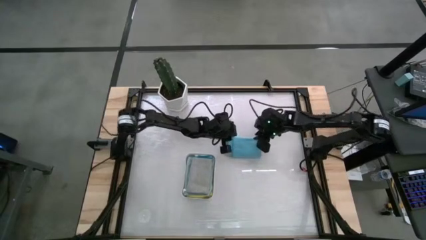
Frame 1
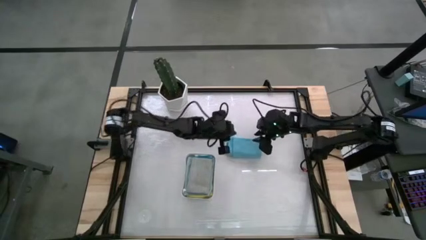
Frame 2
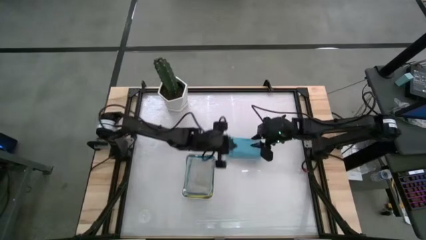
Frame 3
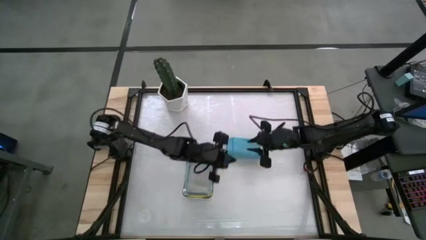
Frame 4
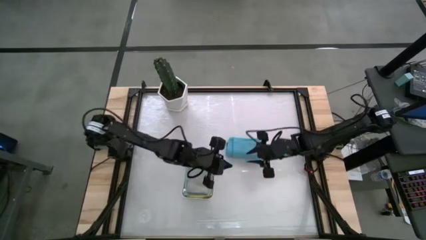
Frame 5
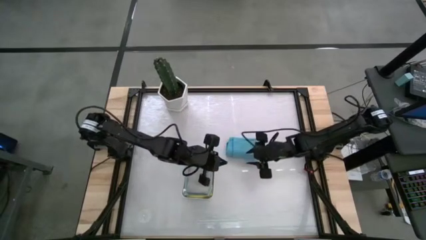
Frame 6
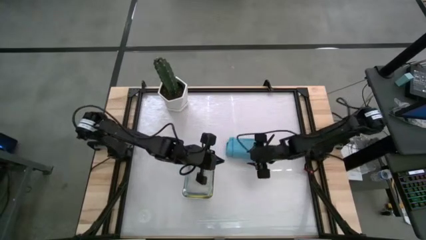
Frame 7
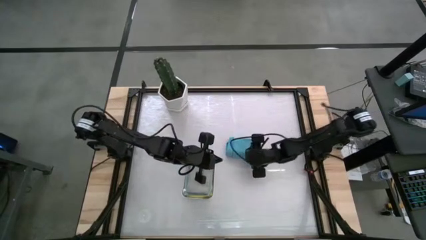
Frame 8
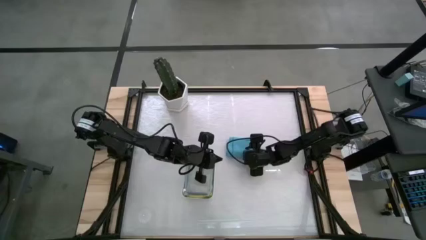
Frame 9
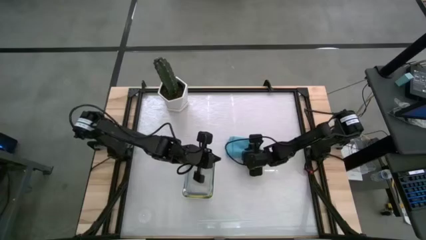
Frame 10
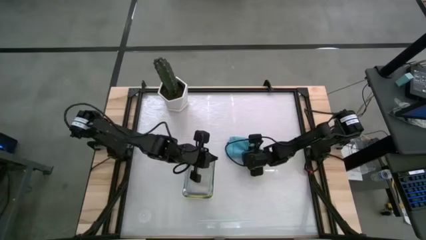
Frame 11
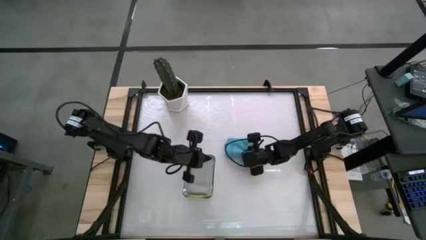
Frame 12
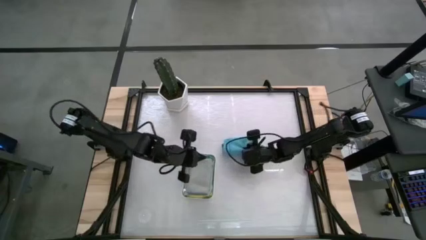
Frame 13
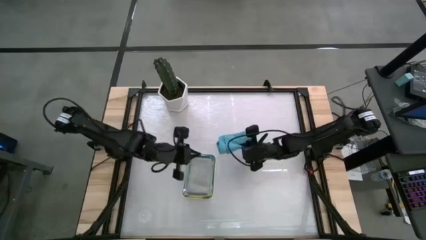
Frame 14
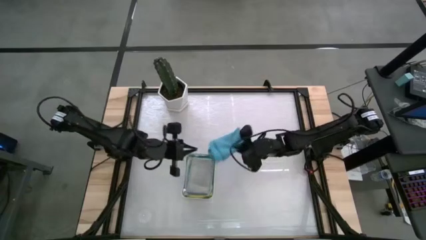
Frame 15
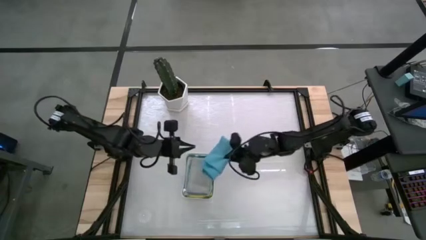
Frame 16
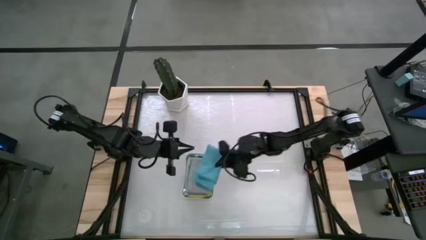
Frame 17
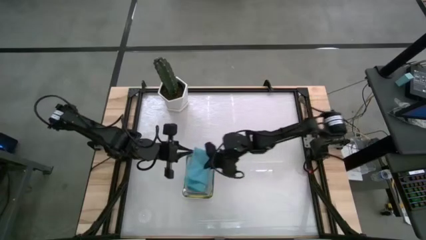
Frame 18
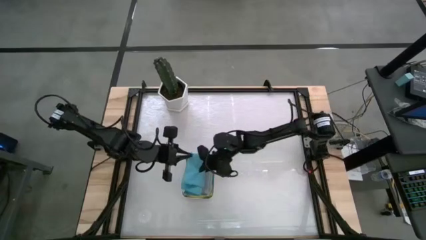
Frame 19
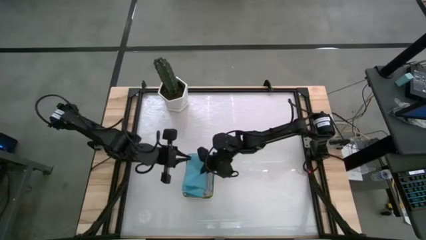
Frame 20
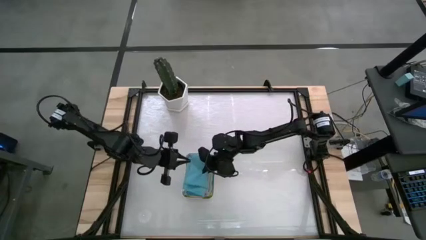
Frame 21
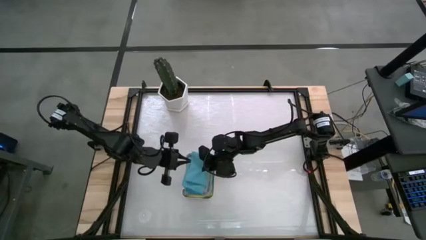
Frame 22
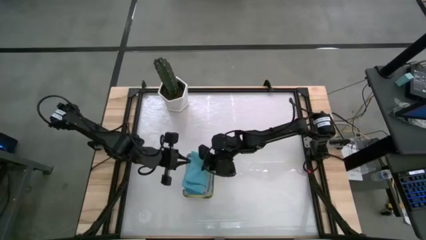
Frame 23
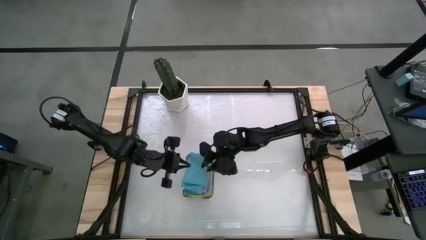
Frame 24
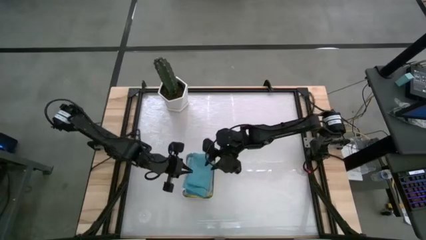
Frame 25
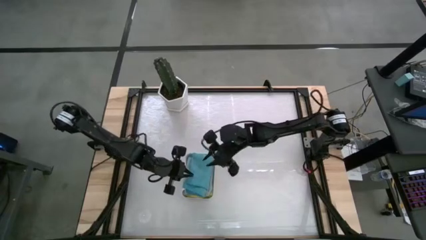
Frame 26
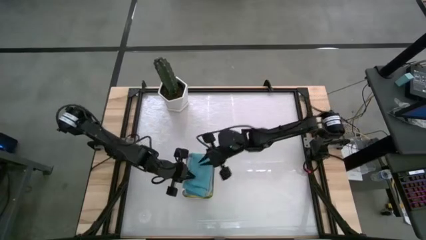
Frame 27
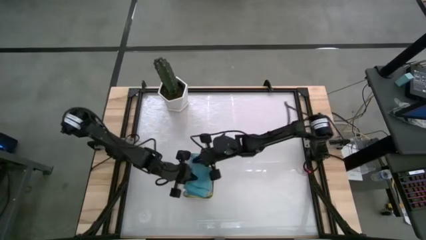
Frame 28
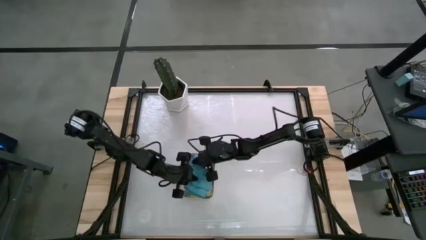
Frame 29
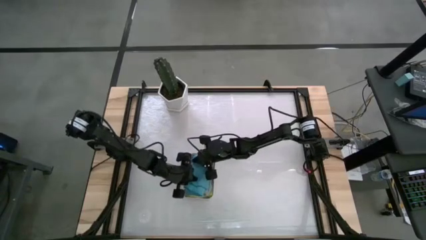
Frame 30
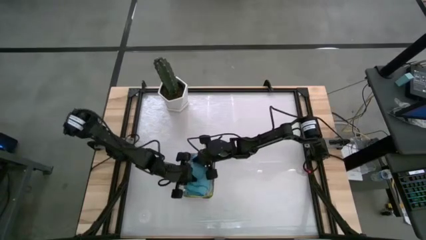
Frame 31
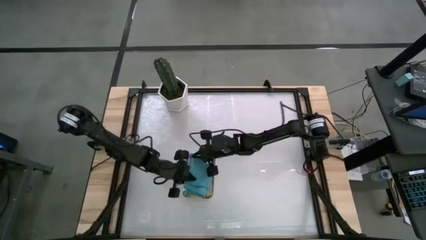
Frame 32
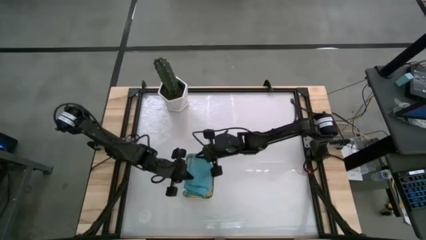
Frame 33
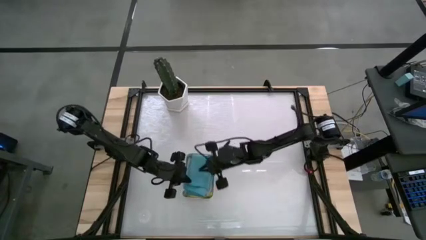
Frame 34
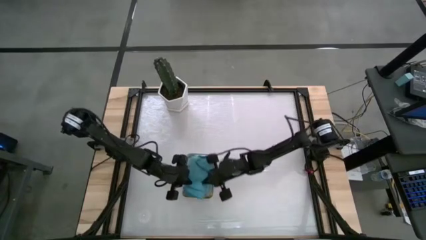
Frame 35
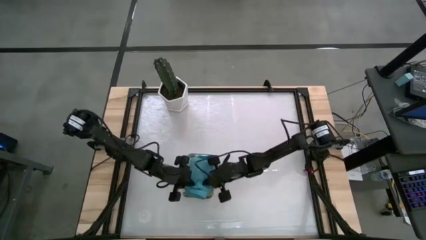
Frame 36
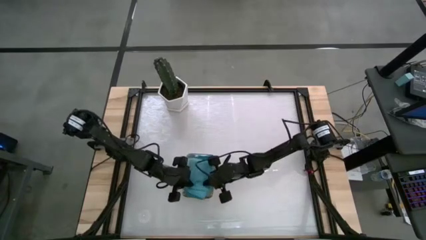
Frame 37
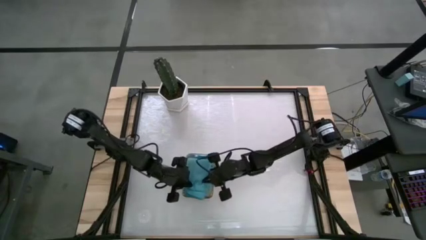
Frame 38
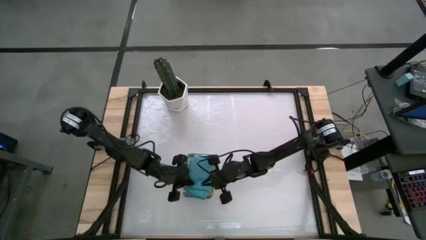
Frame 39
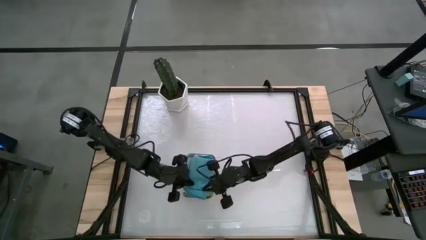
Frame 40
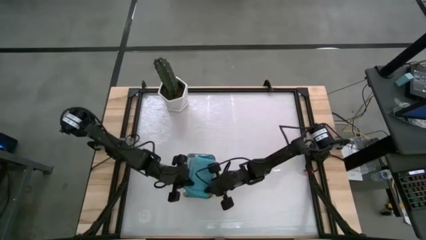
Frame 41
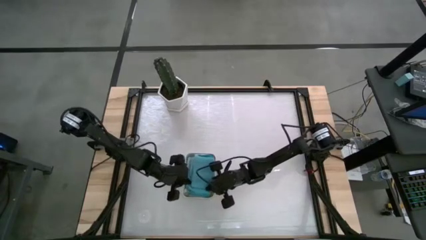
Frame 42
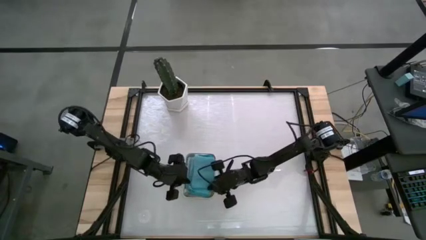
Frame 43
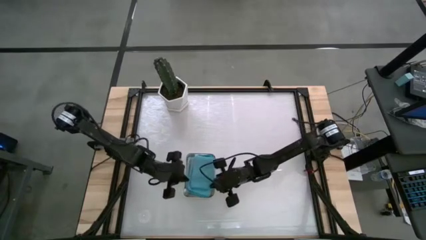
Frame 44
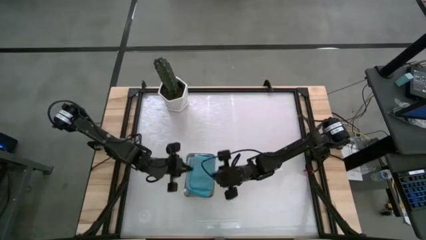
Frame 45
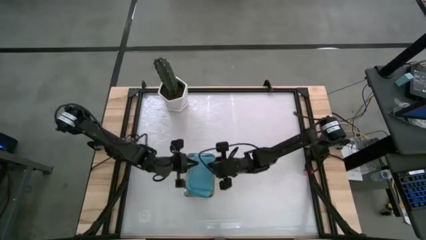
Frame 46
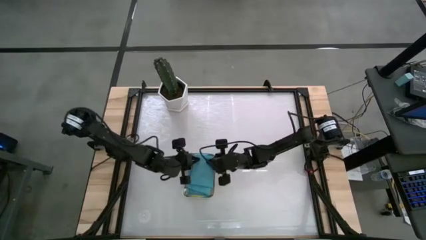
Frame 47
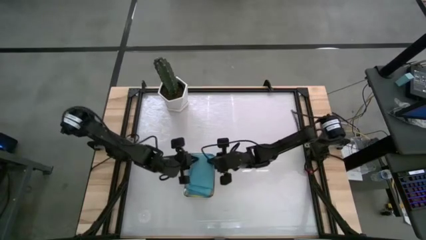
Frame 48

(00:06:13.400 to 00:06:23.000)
Task: Fold microfiber towels
Put the blue microfiber towel into the bin

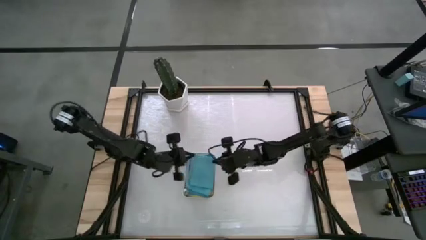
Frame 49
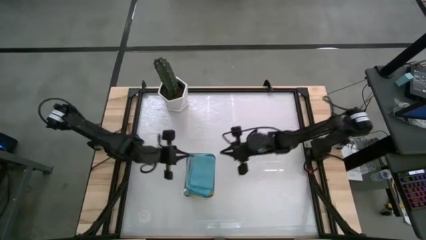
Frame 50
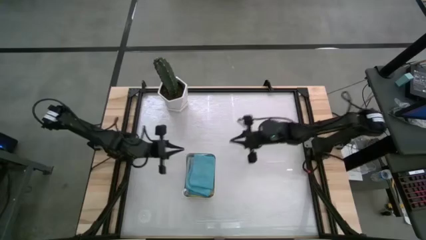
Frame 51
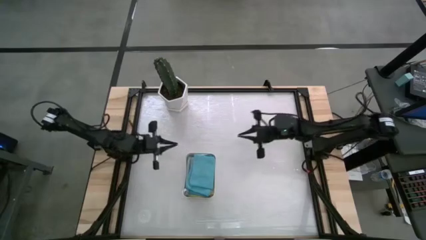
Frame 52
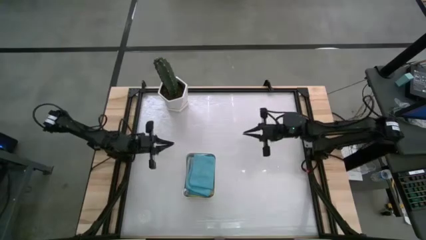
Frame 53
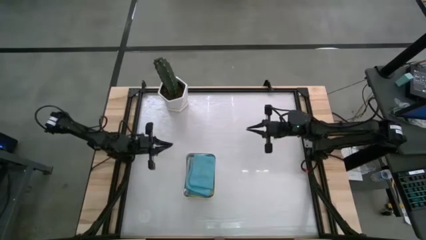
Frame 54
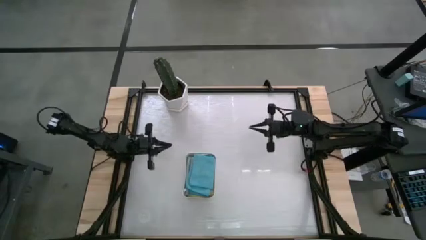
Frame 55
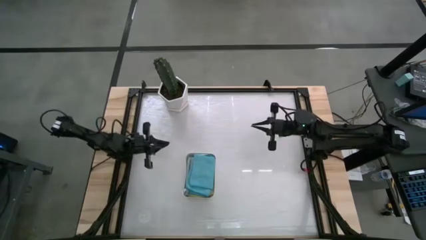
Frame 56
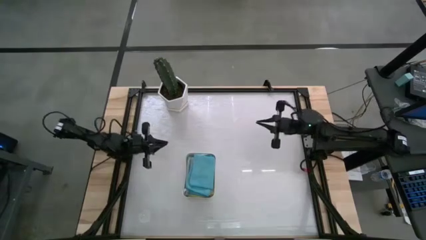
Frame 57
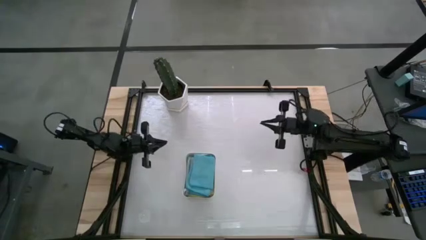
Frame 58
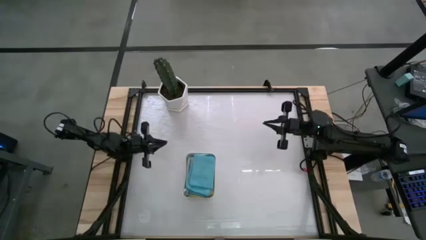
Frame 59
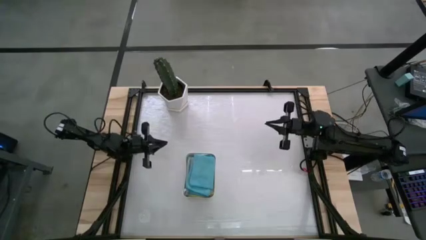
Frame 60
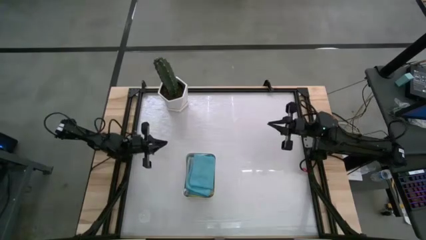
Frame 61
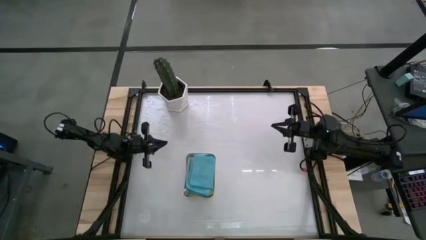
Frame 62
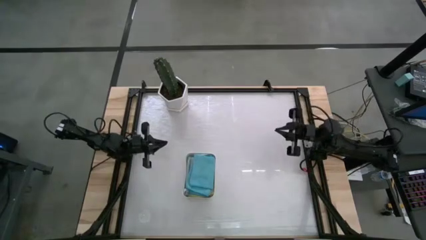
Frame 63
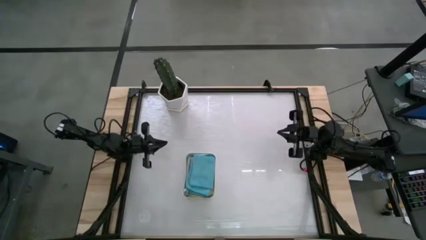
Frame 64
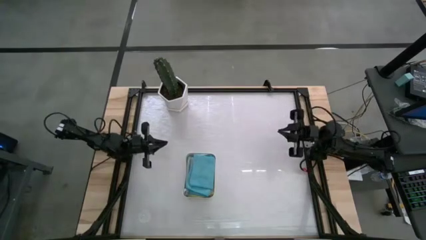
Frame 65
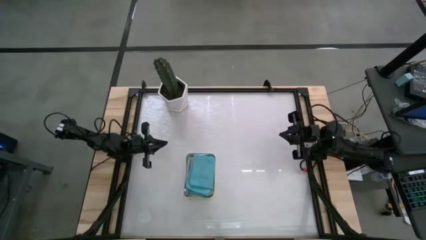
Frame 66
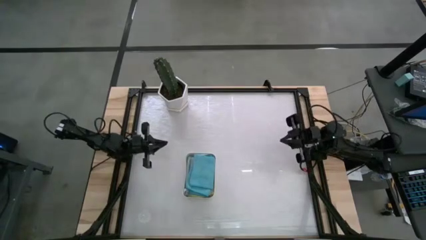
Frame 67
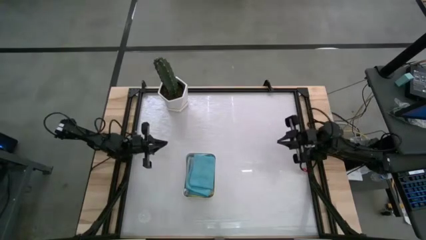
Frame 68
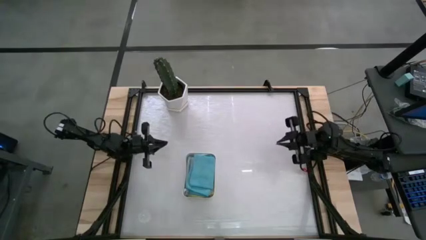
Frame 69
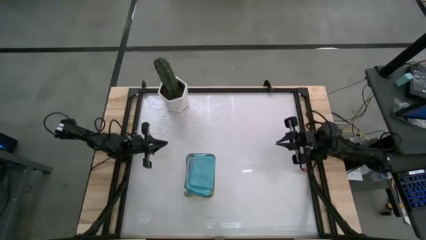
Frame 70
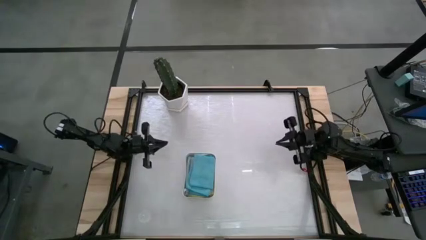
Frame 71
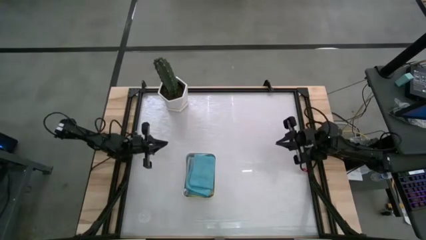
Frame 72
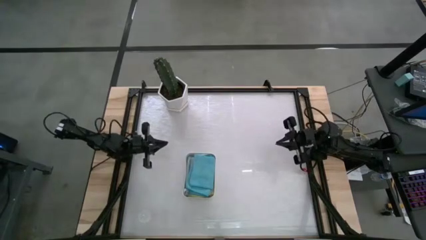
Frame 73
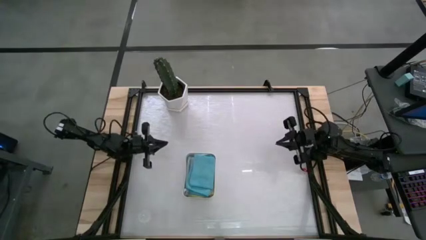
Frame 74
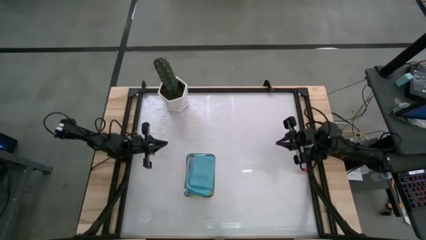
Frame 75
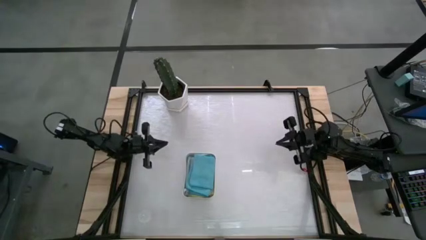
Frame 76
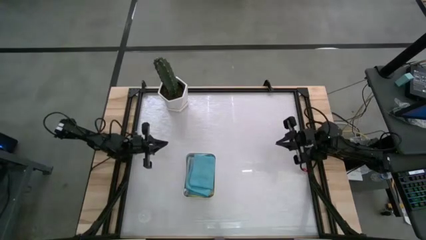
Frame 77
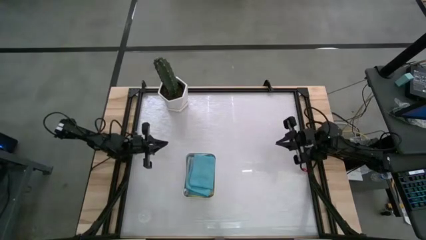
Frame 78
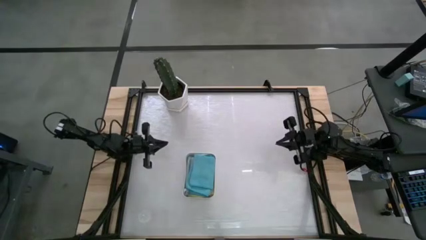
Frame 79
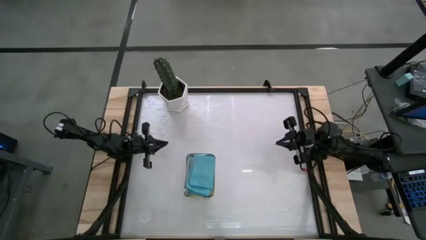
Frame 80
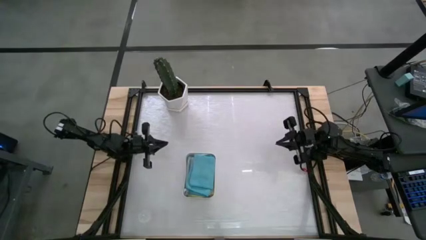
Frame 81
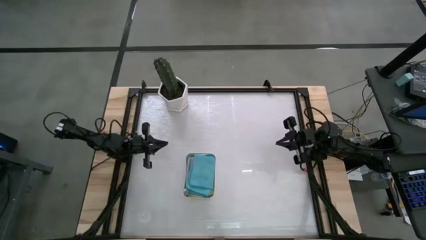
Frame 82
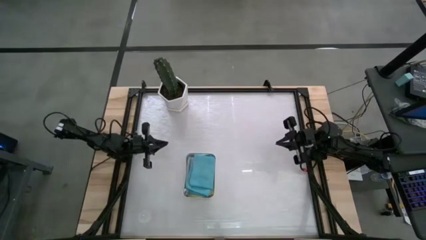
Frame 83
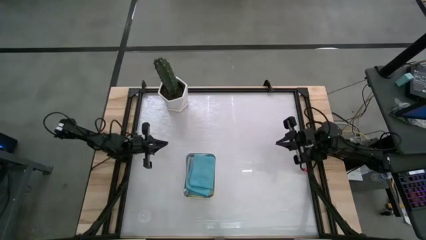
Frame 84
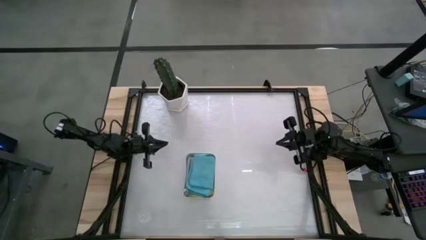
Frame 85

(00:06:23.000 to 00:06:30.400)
Return to Home Position
